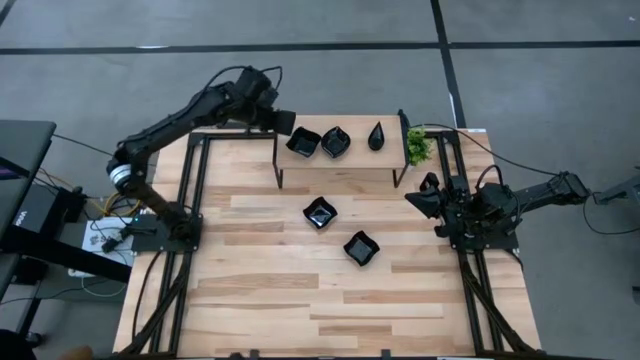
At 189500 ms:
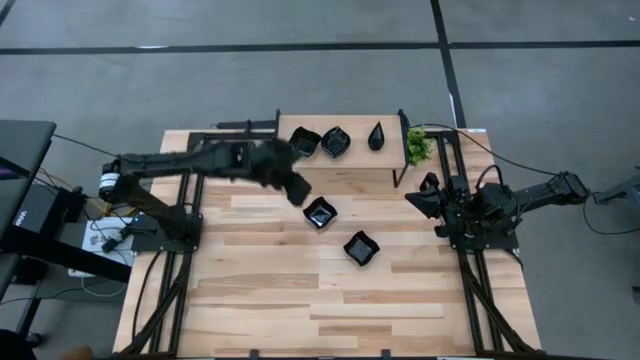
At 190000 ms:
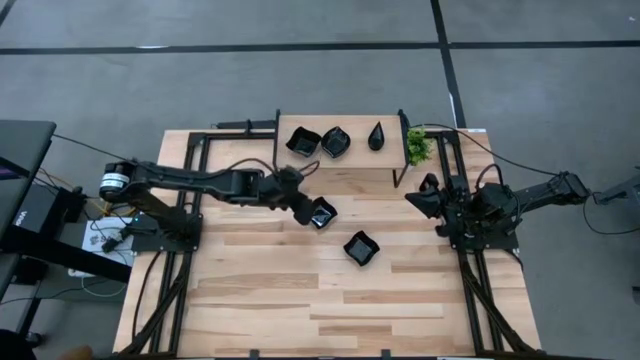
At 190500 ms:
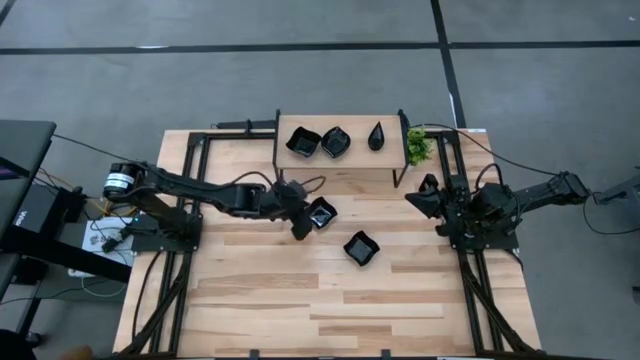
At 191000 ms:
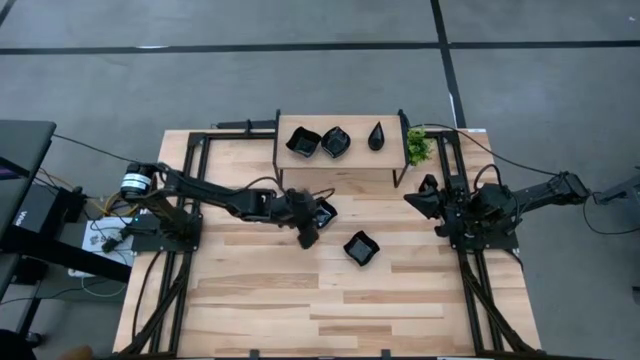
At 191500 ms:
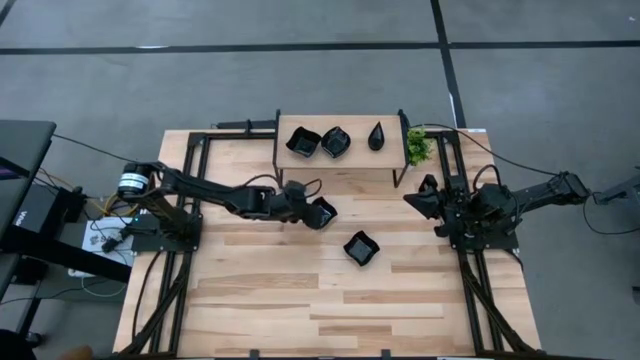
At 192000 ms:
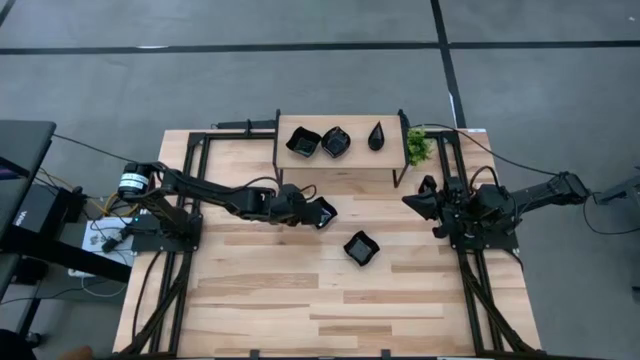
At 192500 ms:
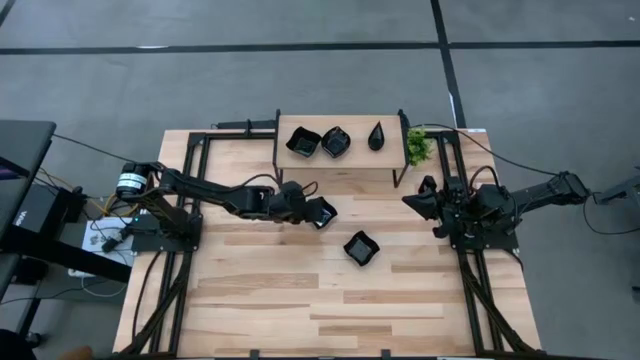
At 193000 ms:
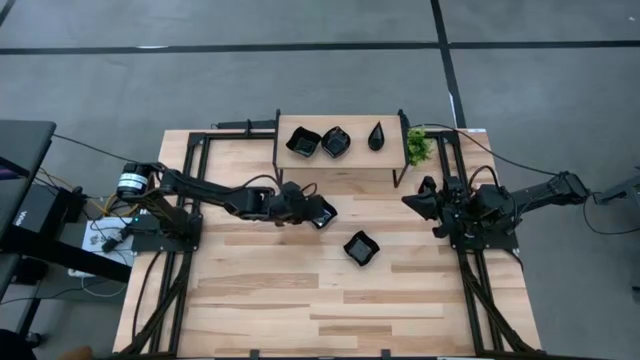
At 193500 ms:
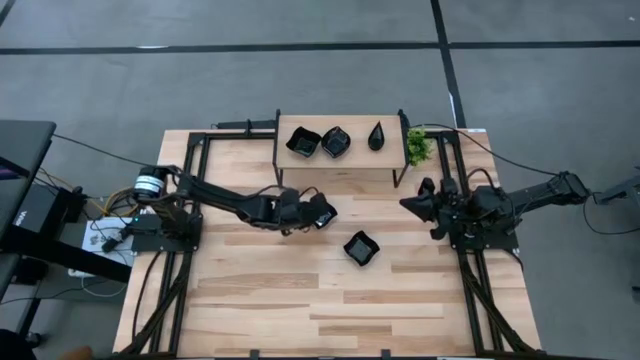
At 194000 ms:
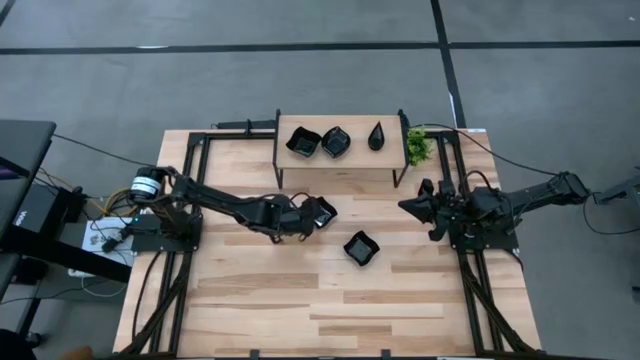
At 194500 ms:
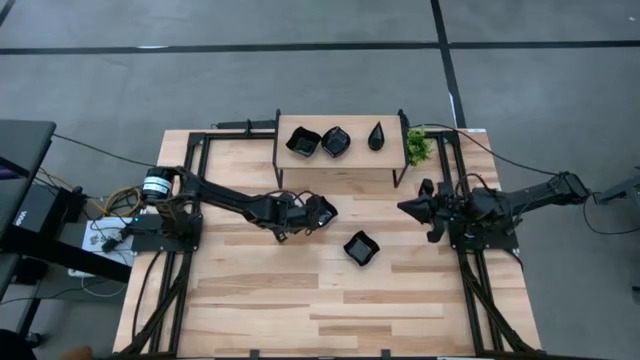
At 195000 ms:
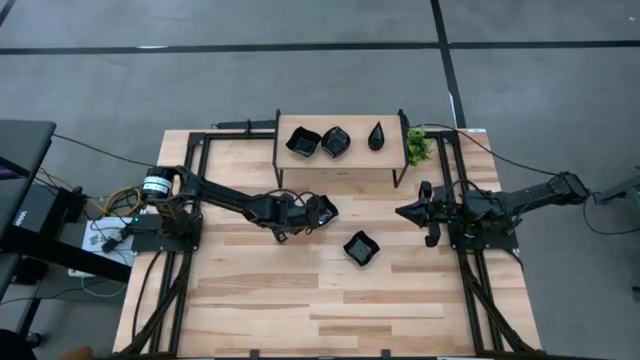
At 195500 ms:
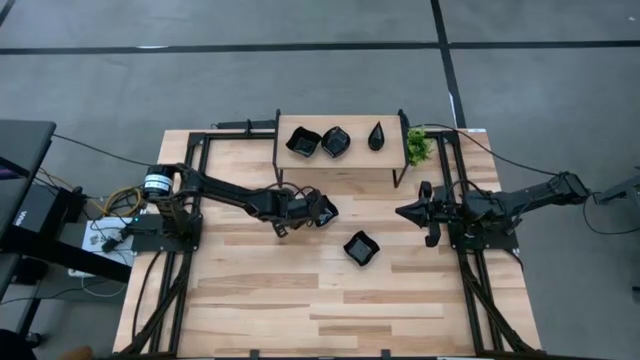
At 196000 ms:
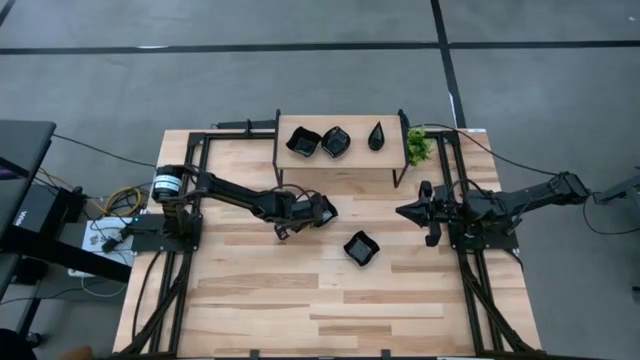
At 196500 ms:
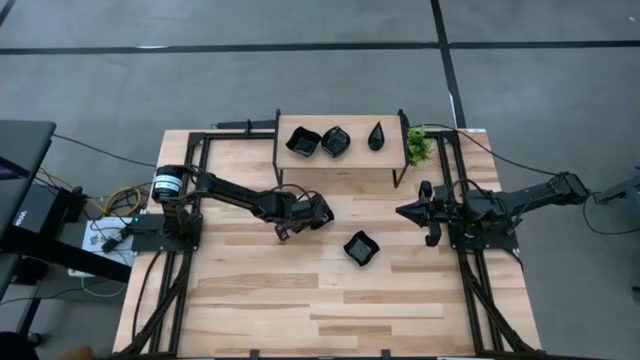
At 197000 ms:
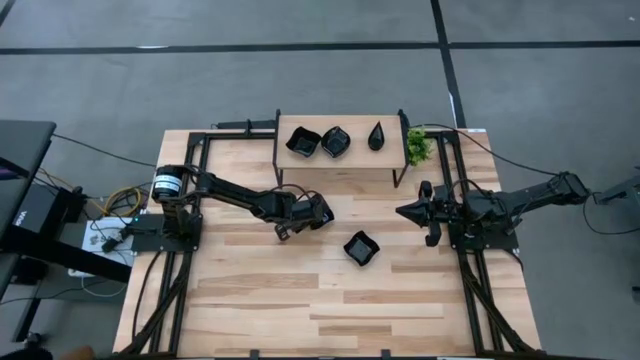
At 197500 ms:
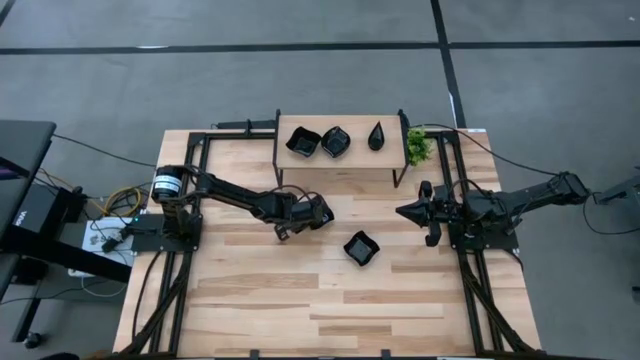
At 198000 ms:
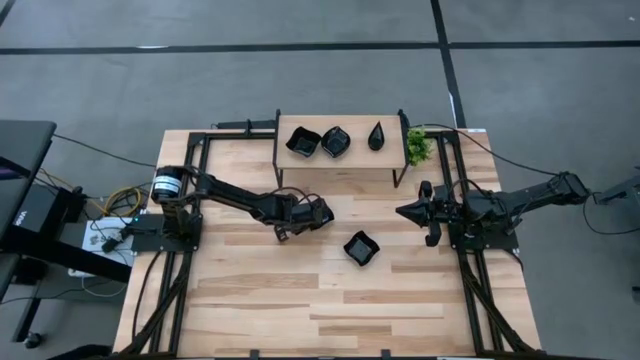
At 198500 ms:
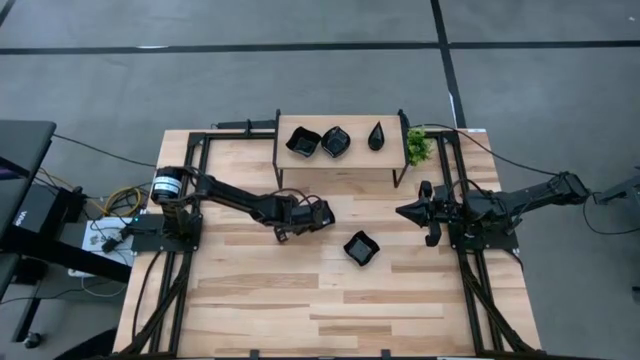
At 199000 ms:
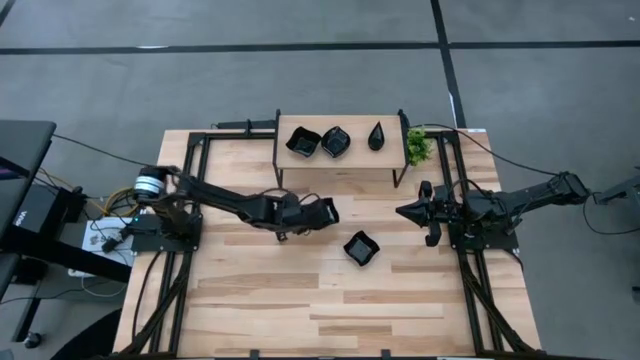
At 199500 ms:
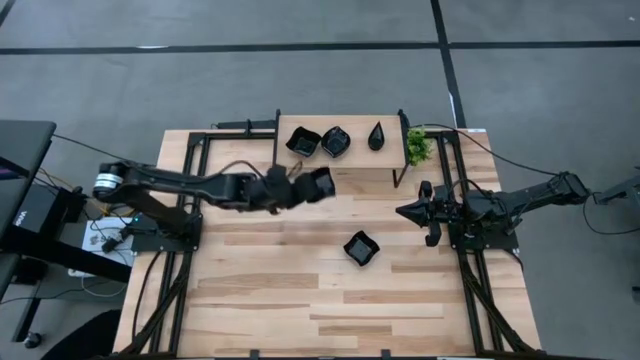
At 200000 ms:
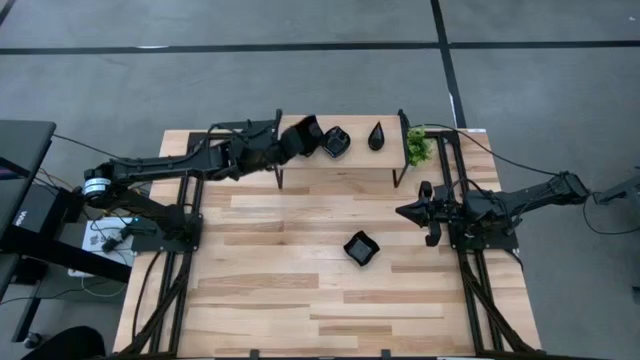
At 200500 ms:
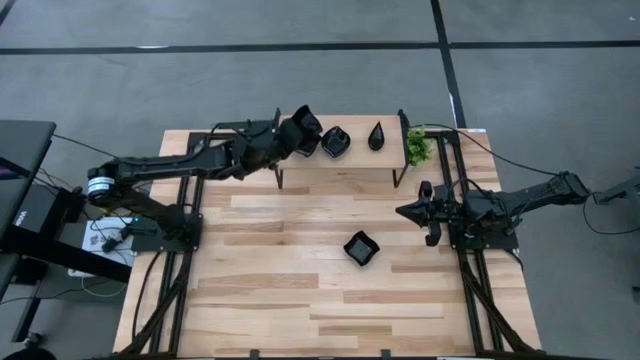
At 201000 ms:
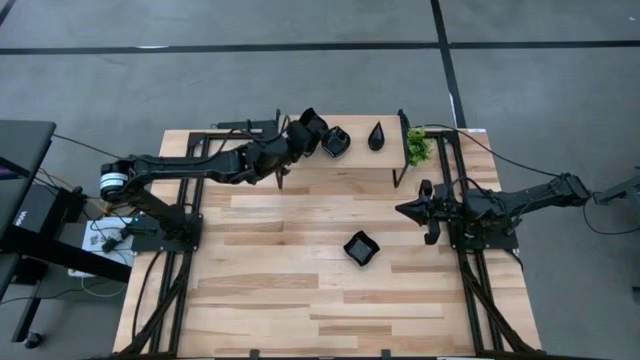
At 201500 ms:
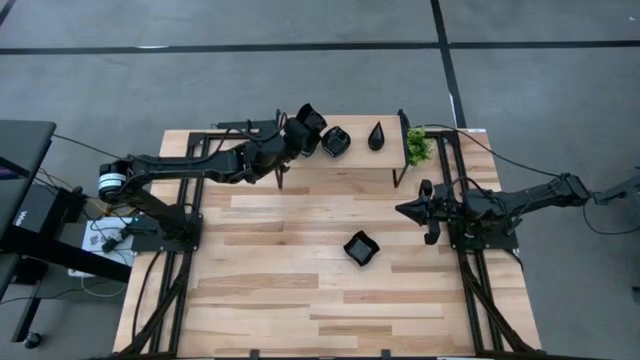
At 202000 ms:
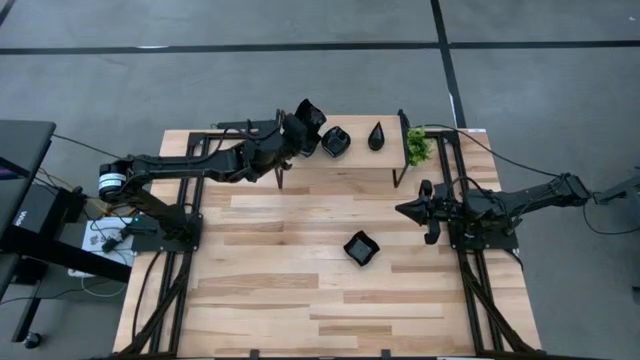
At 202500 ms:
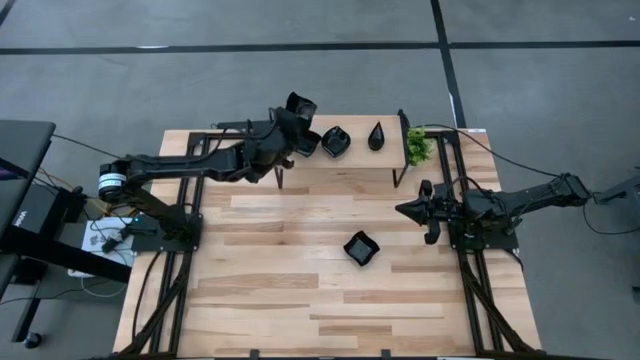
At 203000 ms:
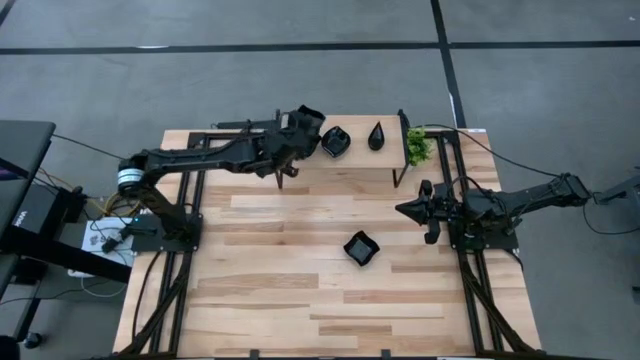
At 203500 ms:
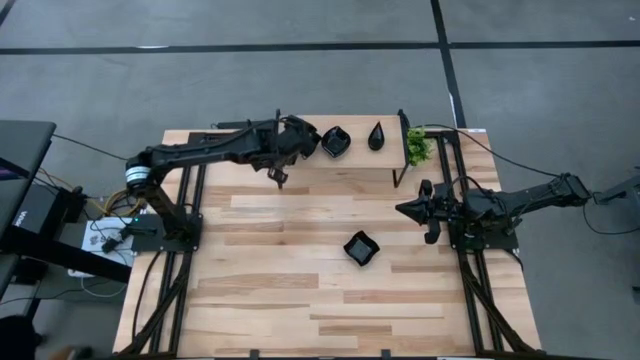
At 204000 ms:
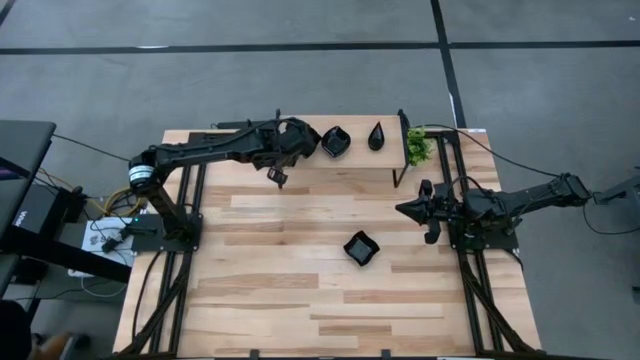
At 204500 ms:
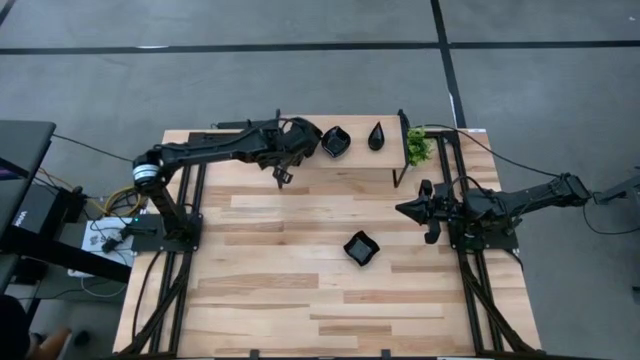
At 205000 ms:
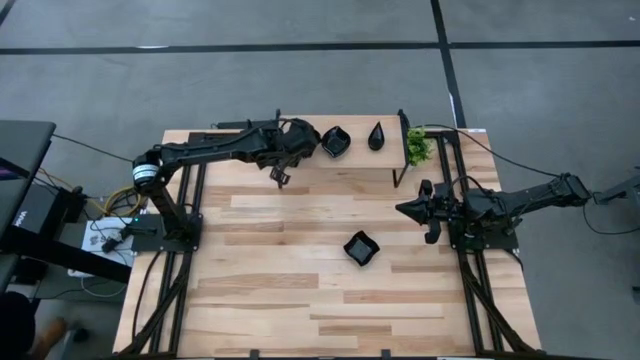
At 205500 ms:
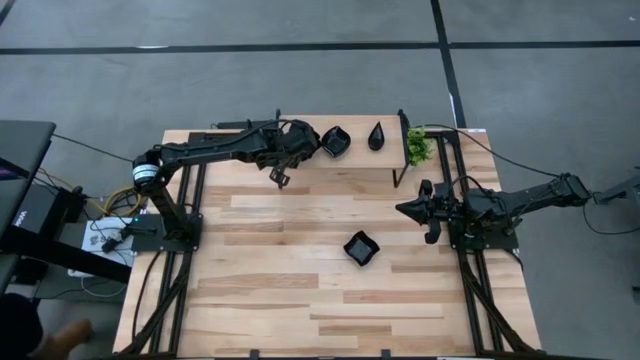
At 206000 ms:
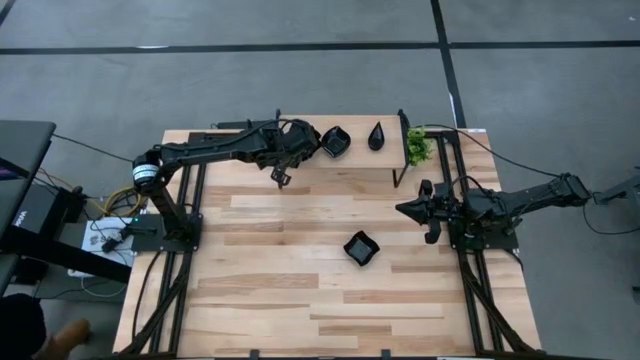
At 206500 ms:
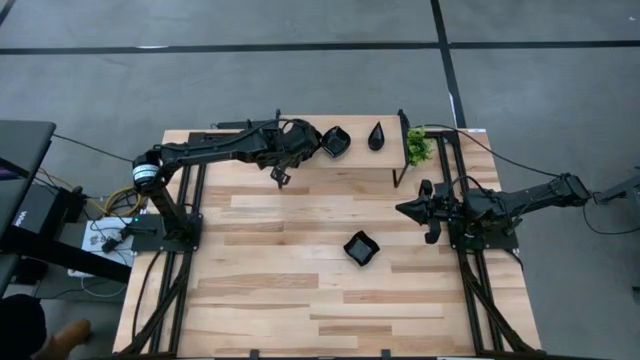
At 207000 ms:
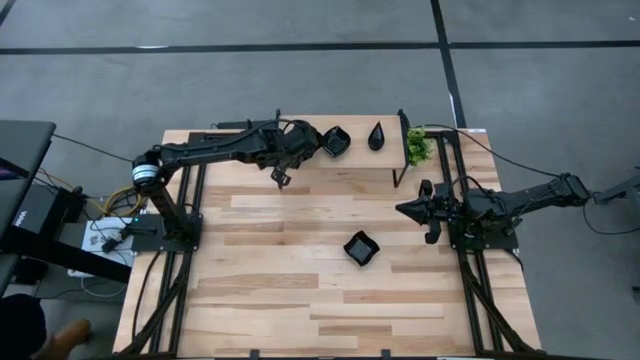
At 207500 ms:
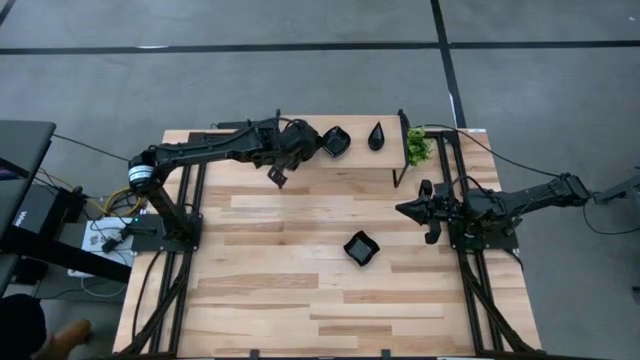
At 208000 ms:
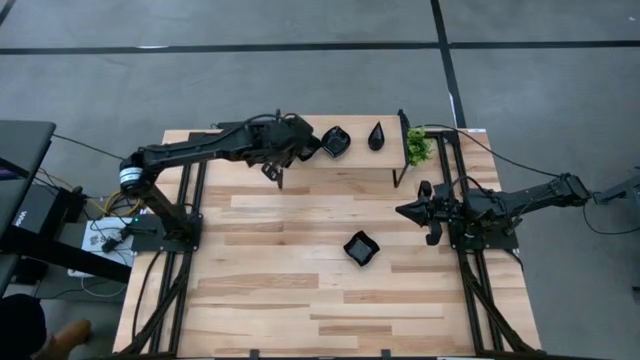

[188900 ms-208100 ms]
Task: Pick & Place Mini shaped plates
Stack the distorted square plate on top of the other distorted square plates on the shelf

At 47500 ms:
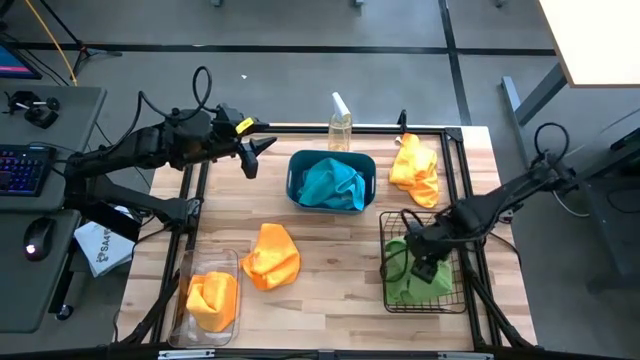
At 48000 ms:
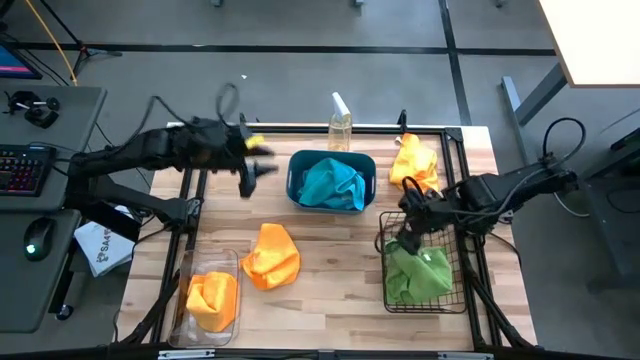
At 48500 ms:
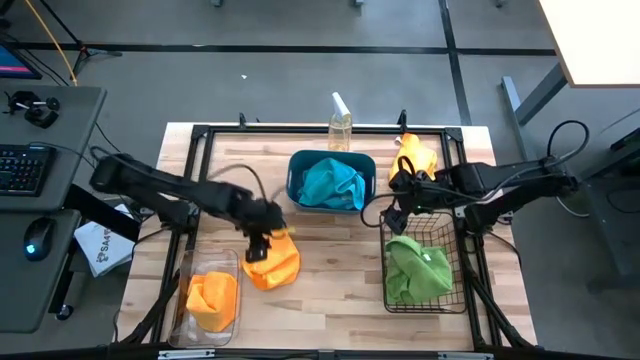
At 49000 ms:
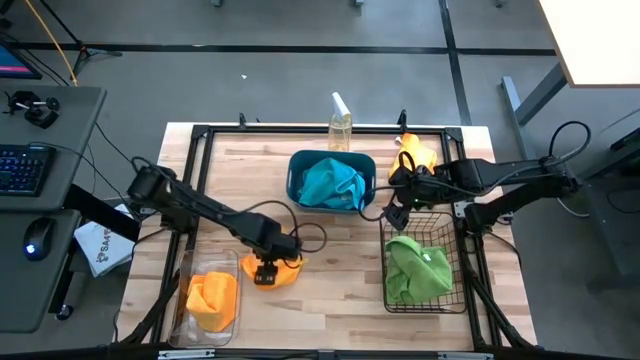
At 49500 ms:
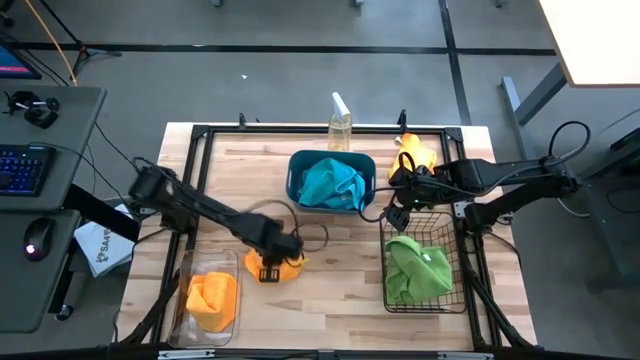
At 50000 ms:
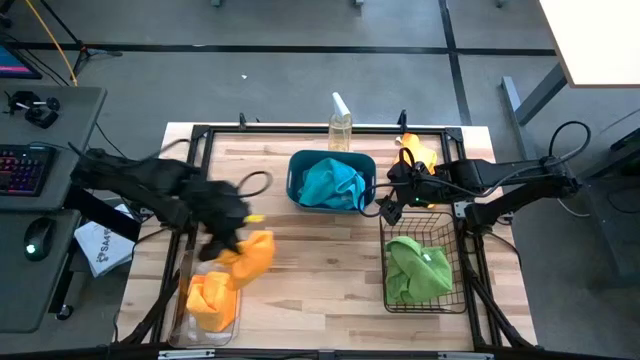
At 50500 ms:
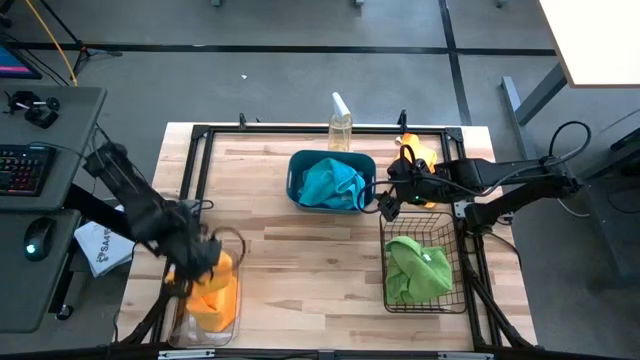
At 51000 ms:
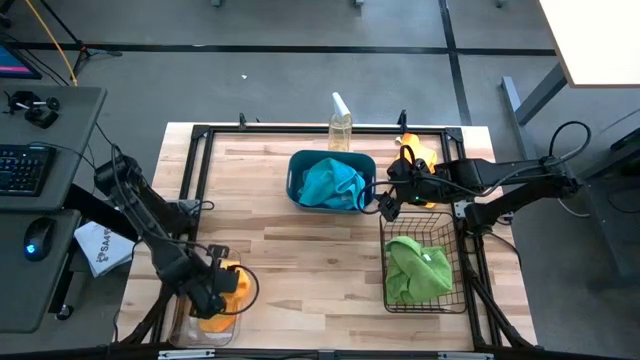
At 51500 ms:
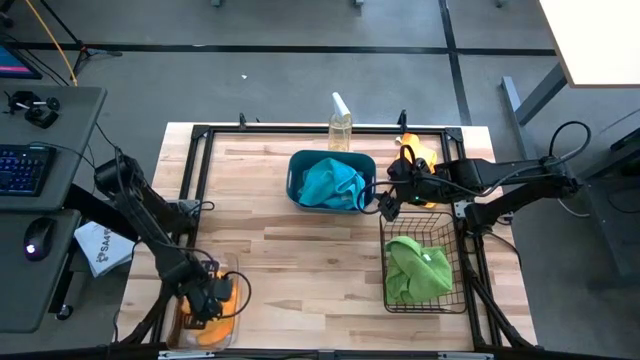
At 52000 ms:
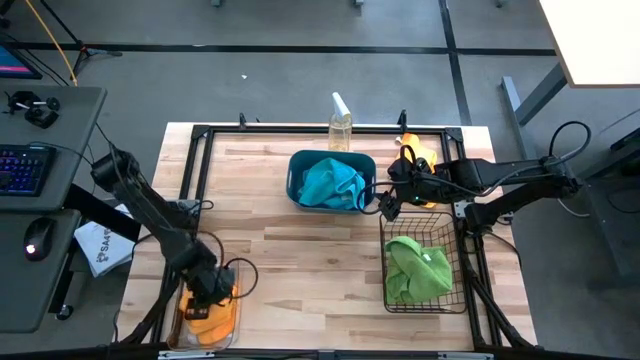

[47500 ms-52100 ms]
Task: Sort microfiber towel by color & place in baskets
Put the bottom orange towel into the transparent bin
